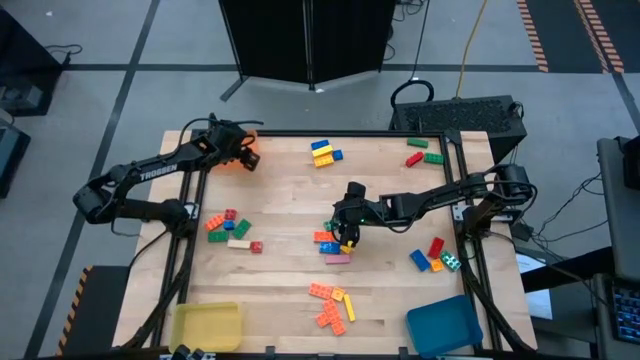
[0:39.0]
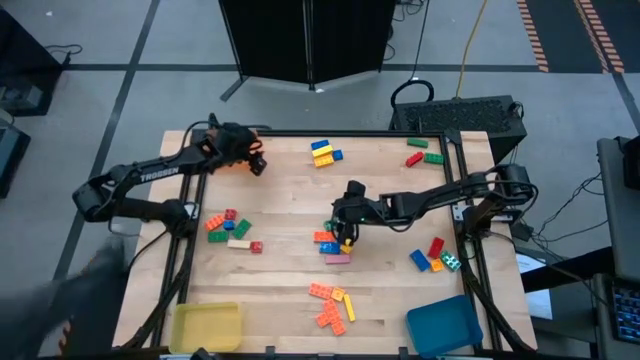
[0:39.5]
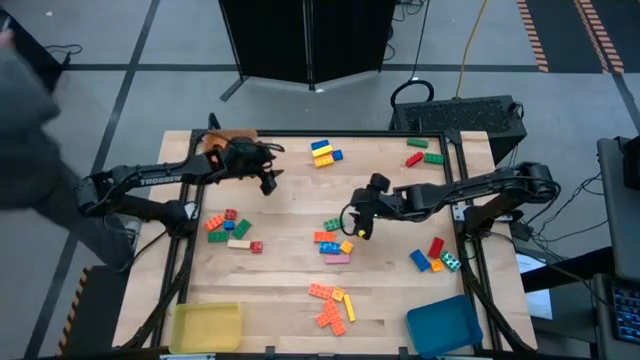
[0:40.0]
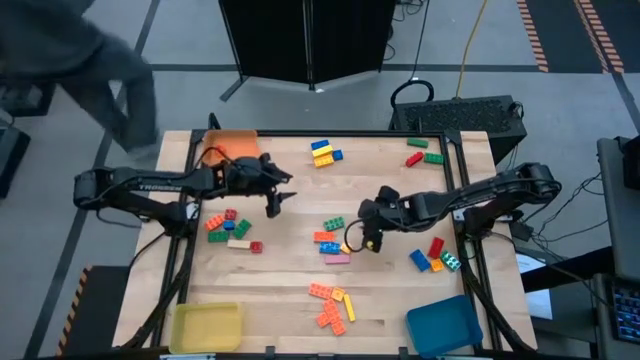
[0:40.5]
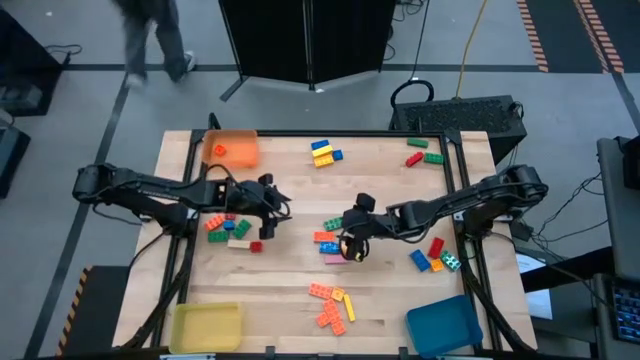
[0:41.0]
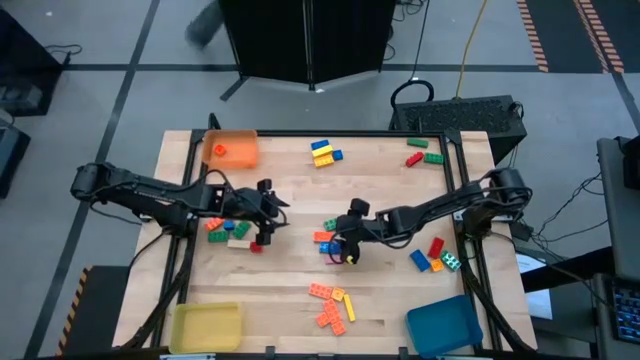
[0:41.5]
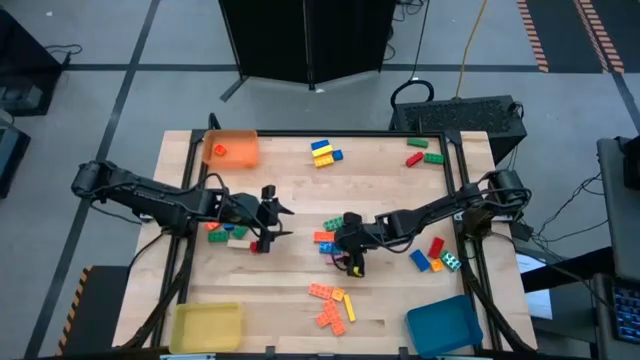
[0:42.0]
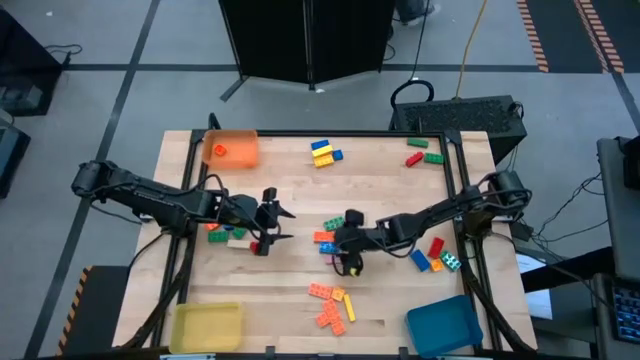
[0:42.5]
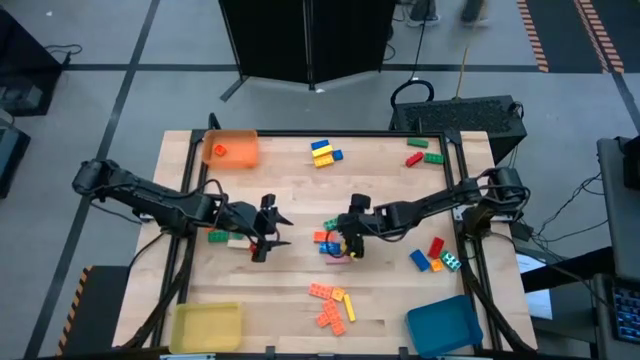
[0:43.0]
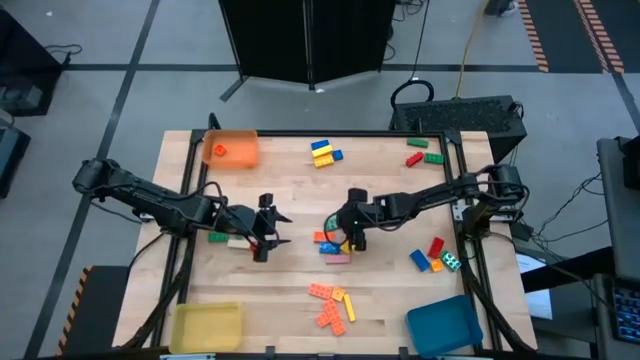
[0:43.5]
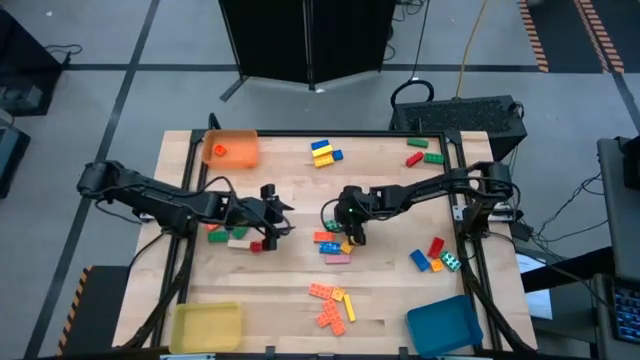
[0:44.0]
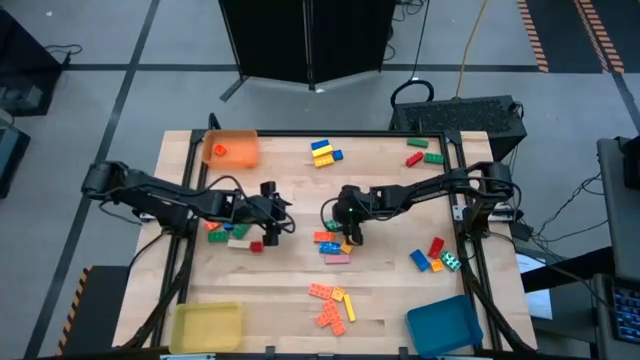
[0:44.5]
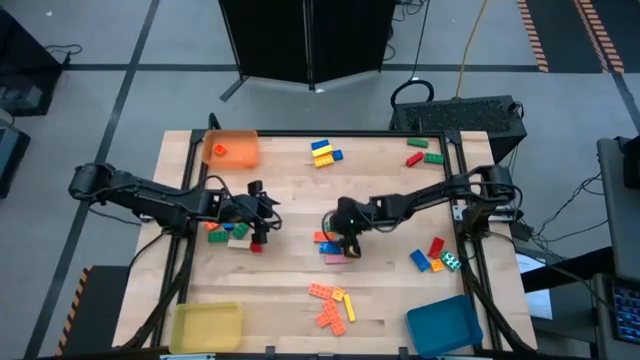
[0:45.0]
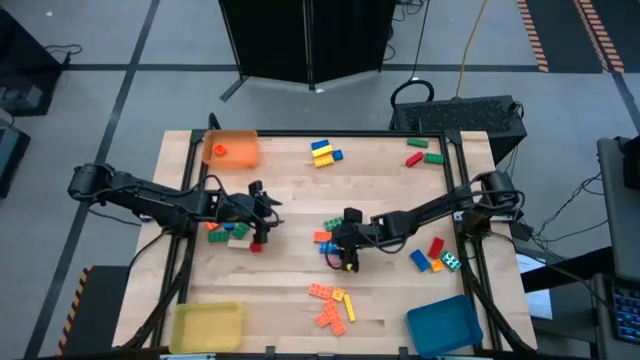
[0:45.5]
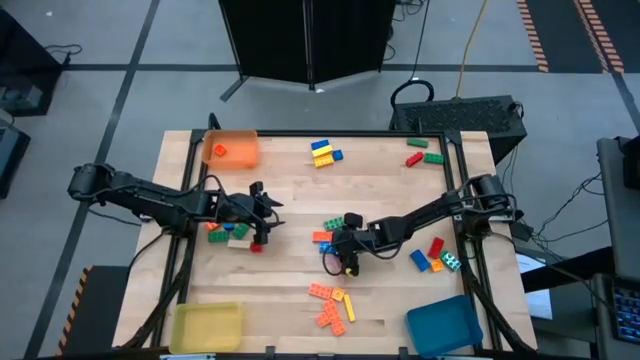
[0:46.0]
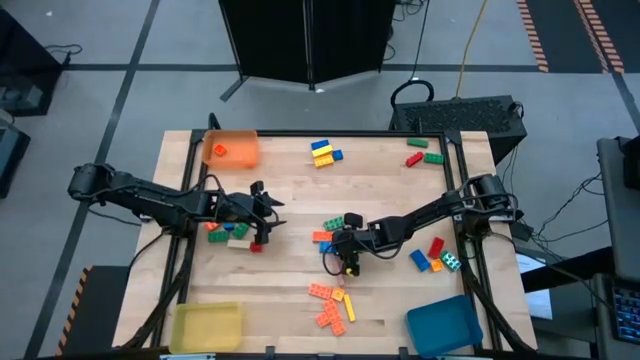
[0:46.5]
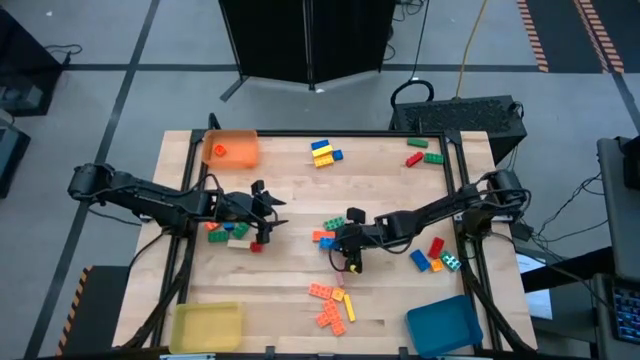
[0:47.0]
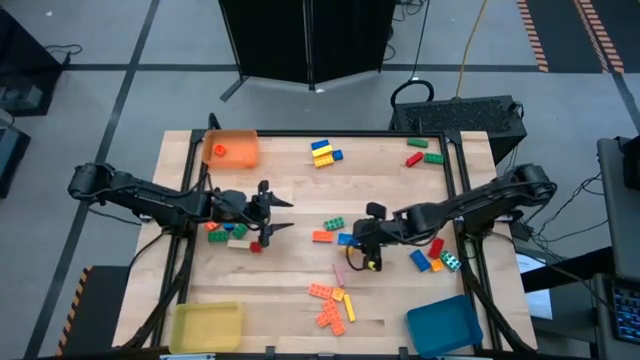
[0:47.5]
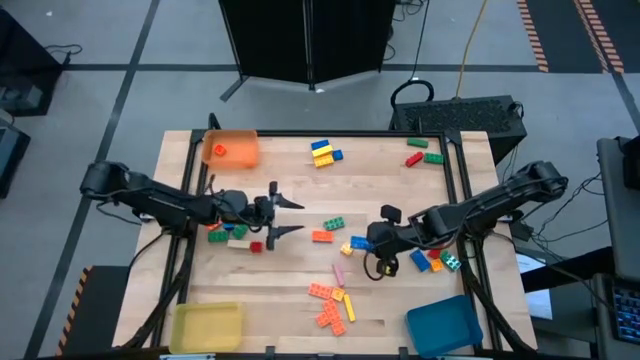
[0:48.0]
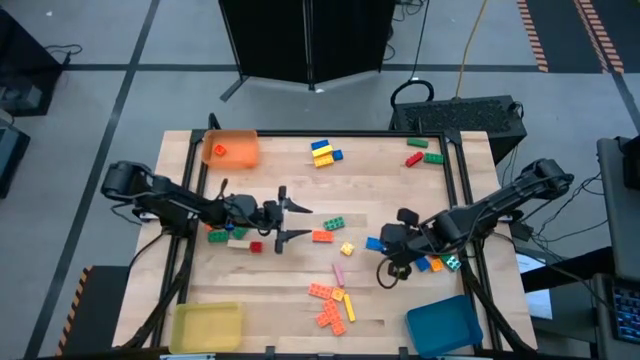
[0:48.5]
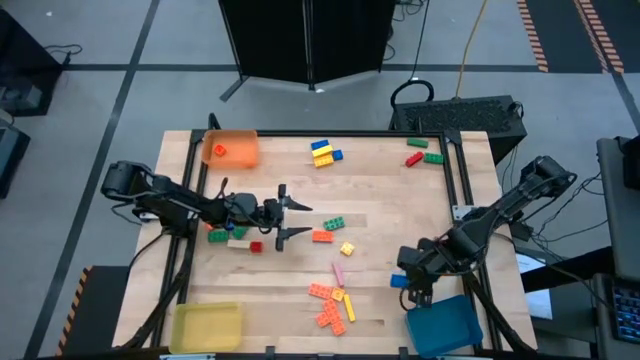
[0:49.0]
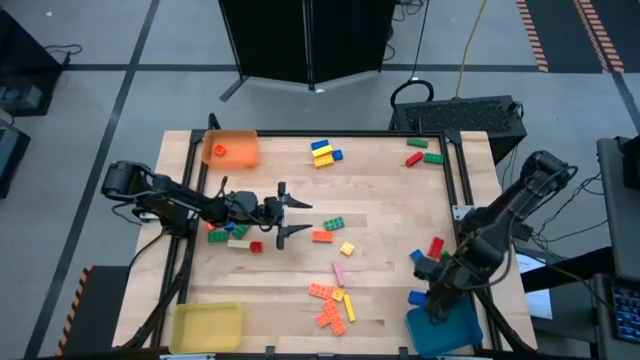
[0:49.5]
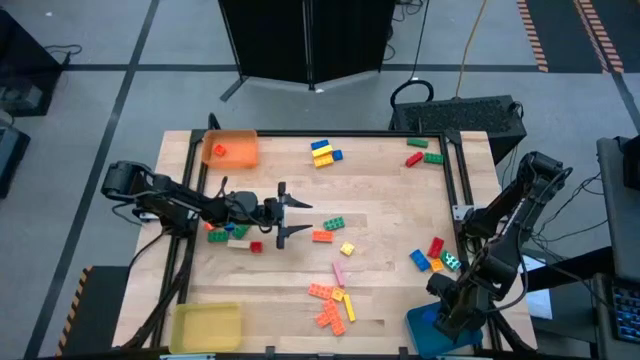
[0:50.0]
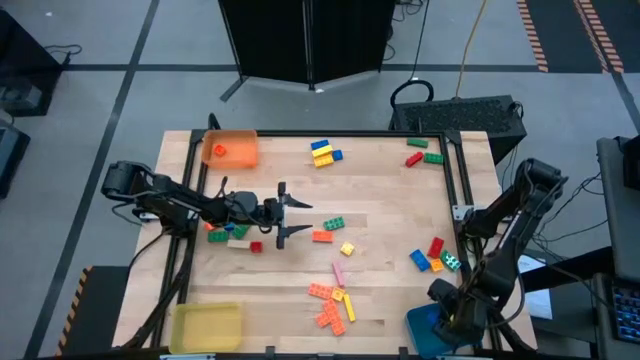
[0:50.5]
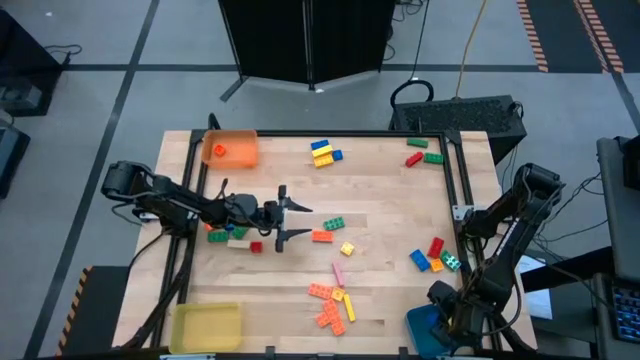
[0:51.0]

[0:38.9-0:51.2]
Task: Sort blocks by size
Put the blue 8 stud game piece into the blue bin

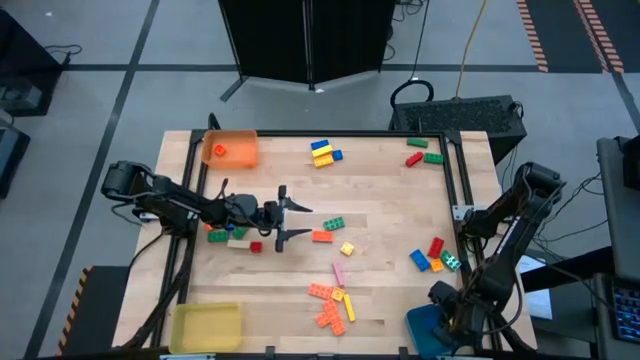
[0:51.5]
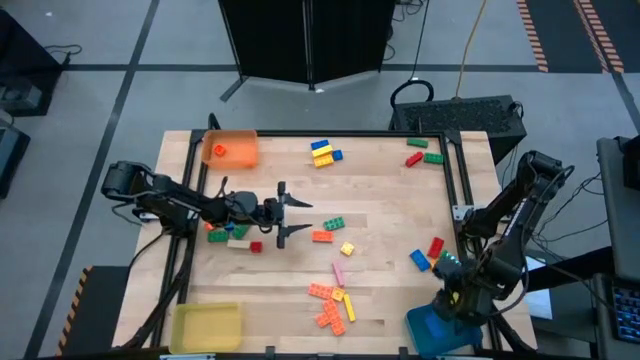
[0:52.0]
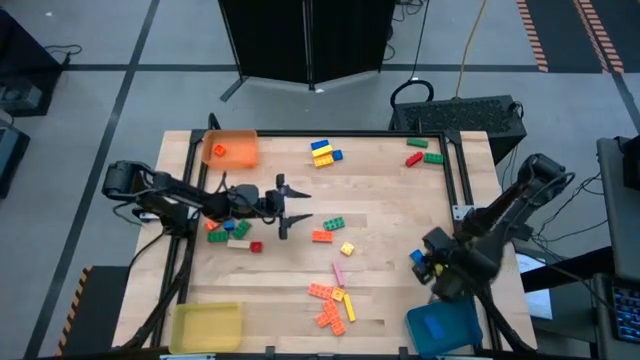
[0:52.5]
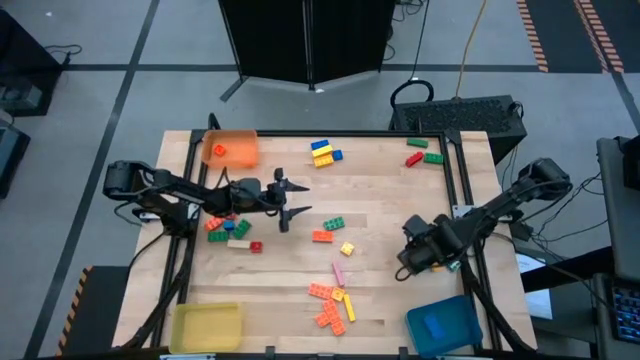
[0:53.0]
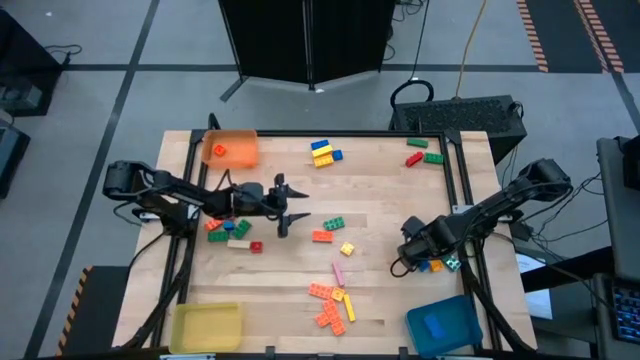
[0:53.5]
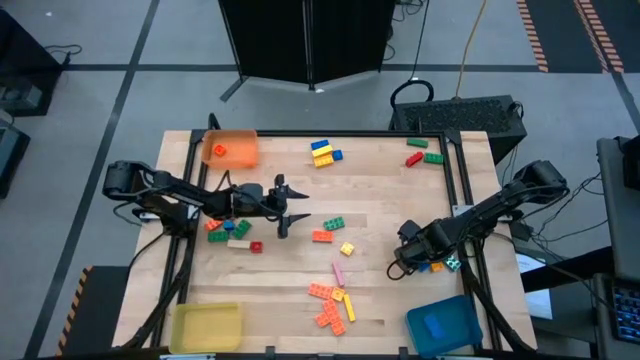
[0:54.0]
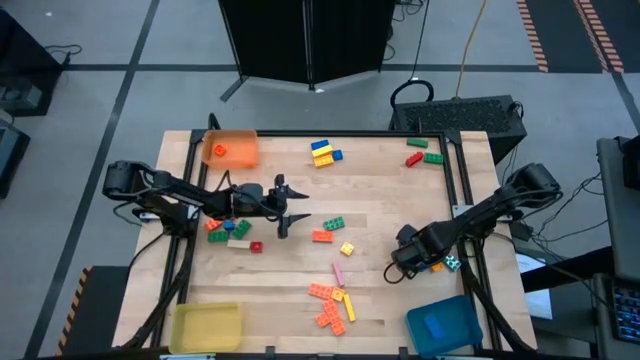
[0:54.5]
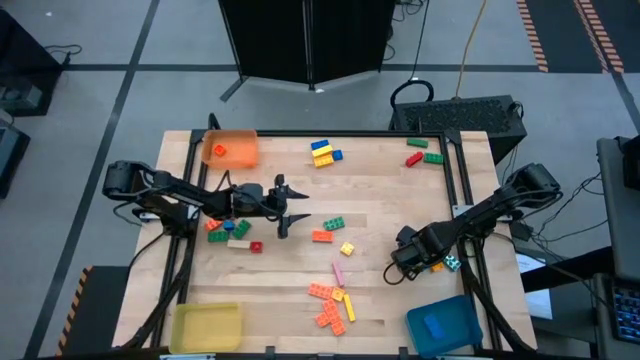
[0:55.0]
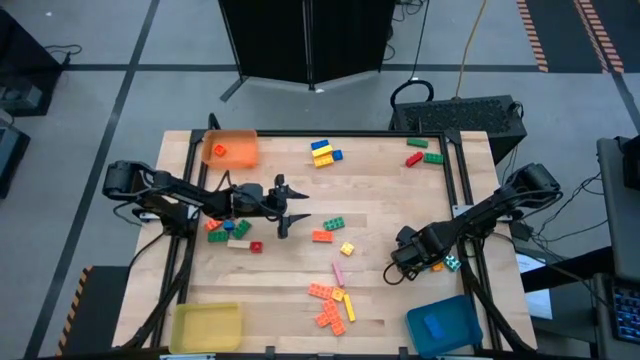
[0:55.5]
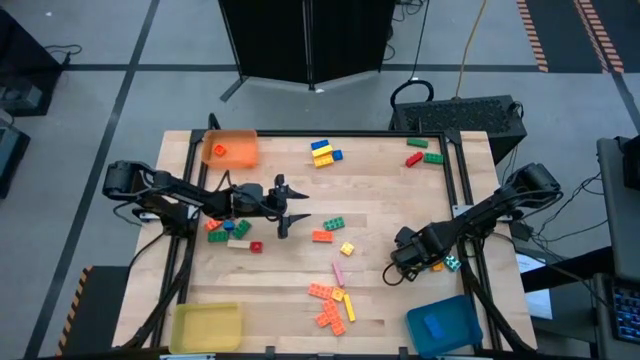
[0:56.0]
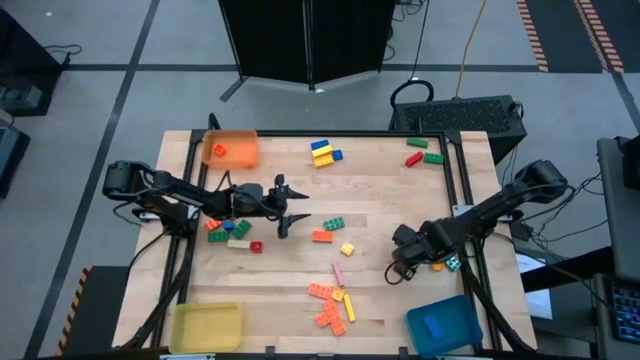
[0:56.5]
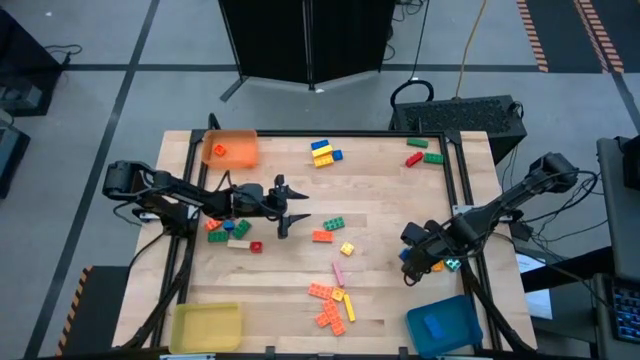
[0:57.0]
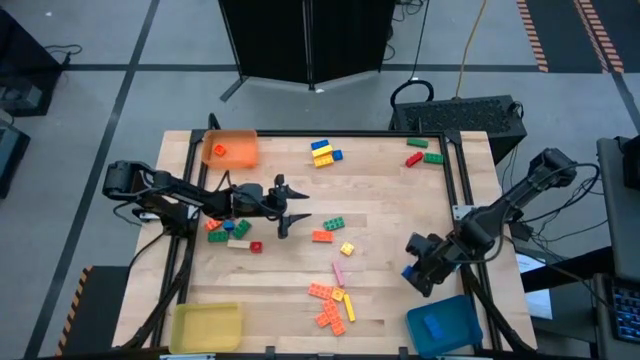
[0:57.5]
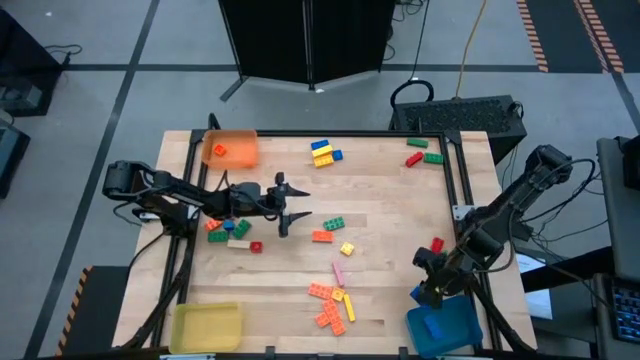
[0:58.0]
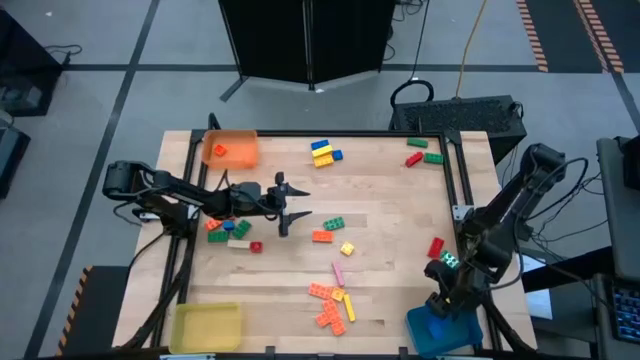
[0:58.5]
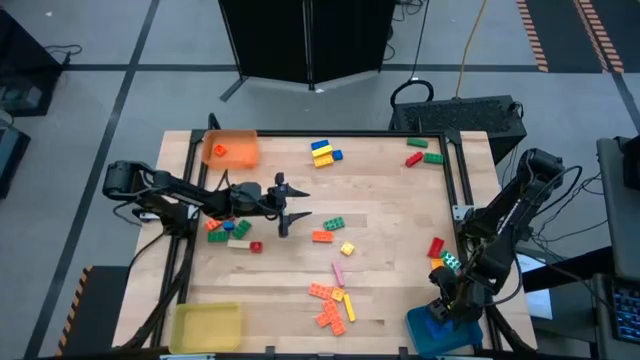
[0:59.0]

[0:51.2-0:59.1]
Put the blue 8 stud game piece into the blue bin

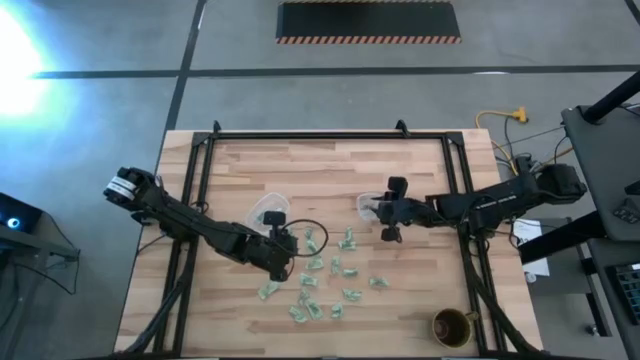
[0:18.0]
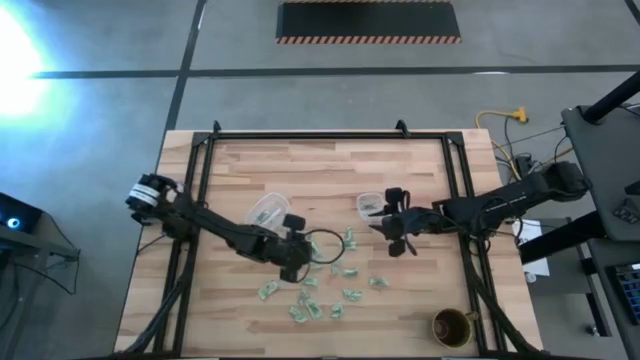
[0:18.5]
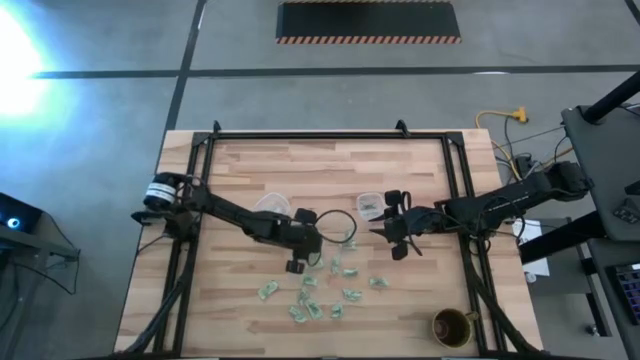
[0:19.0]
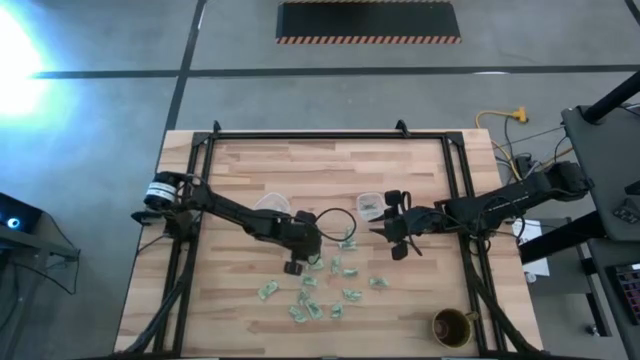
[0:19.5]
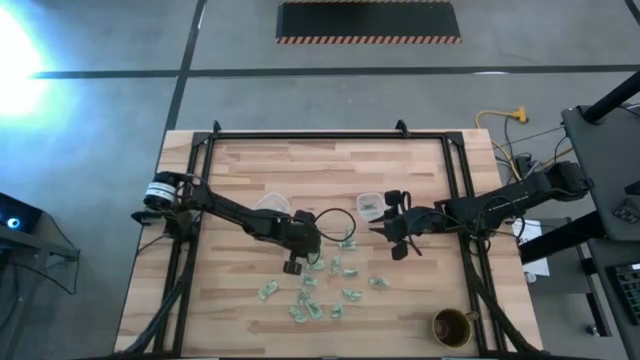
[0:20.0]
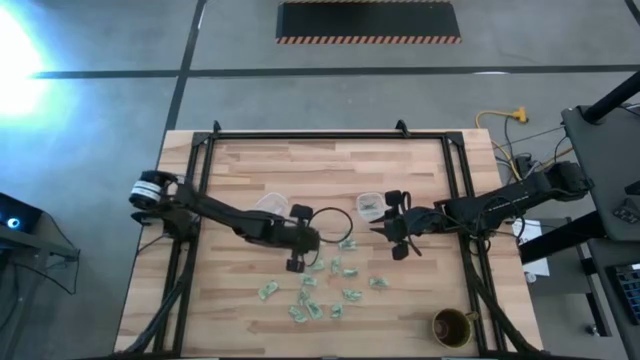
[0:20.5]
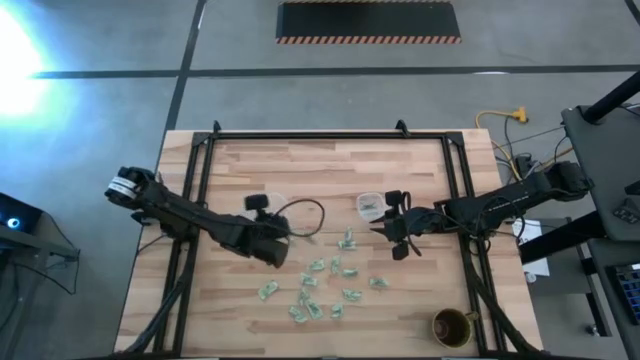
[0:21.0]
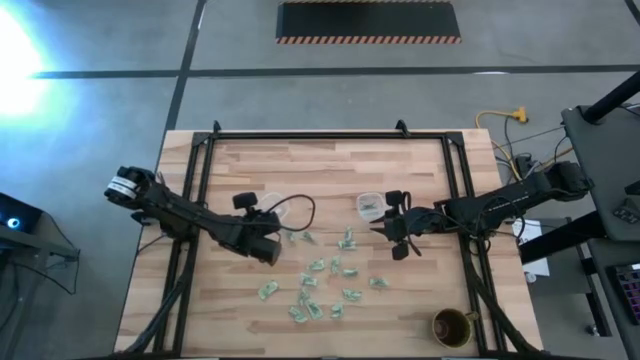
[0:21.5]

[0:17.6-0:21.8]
Task: Pick and place Stevia / Truvia into bins
Put the light green stevia packet into the left transparent container
